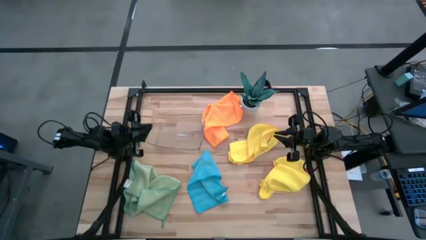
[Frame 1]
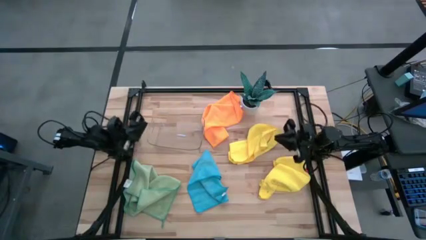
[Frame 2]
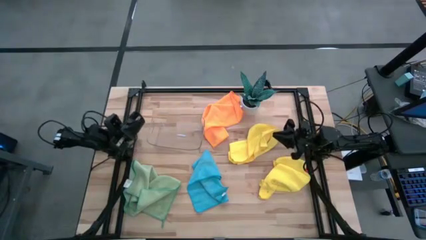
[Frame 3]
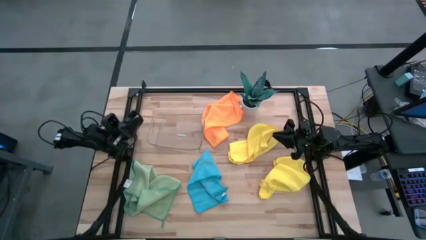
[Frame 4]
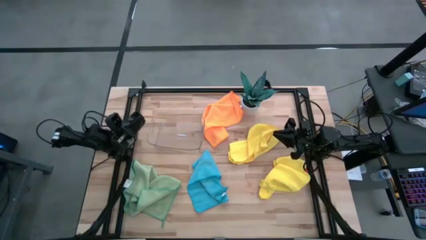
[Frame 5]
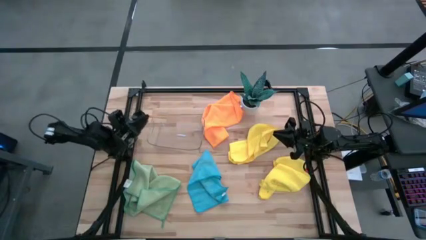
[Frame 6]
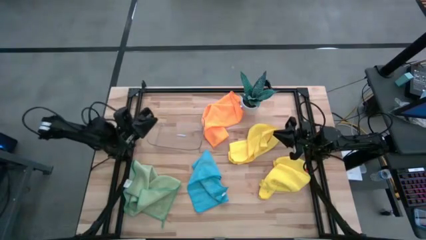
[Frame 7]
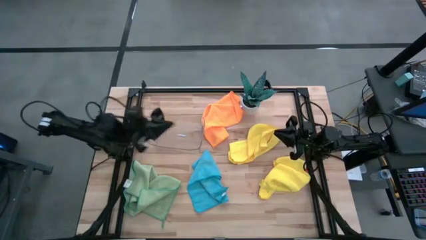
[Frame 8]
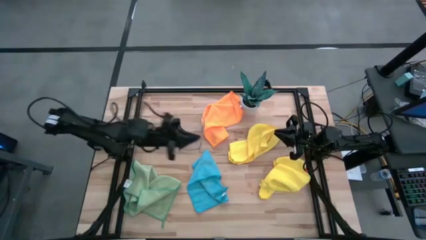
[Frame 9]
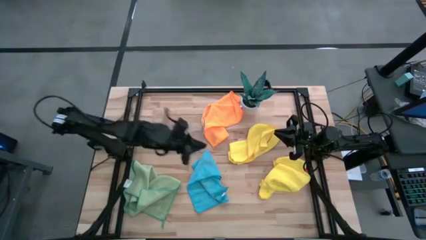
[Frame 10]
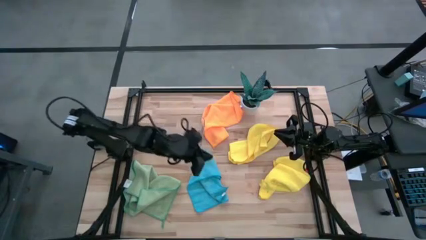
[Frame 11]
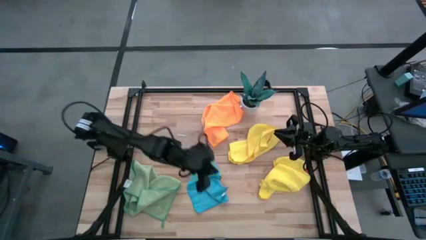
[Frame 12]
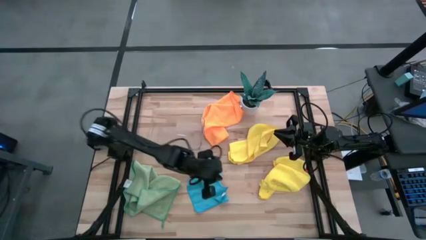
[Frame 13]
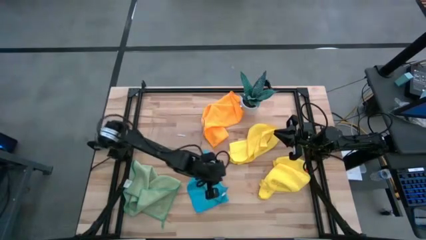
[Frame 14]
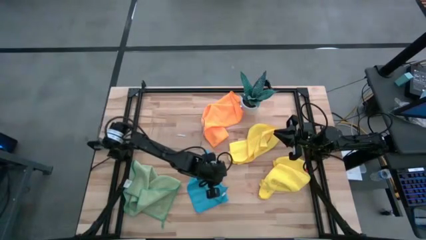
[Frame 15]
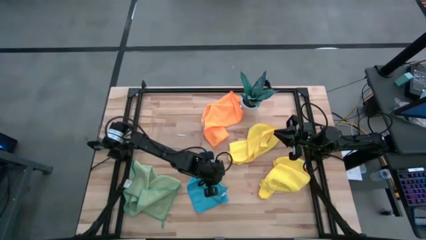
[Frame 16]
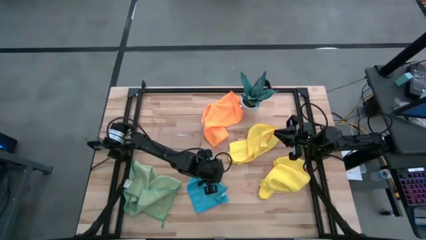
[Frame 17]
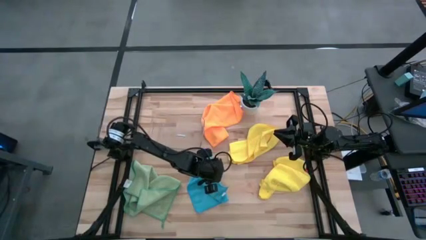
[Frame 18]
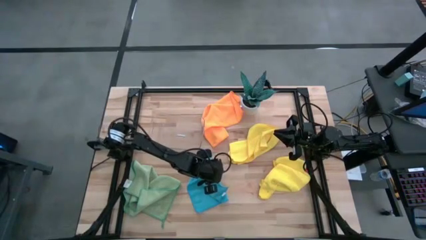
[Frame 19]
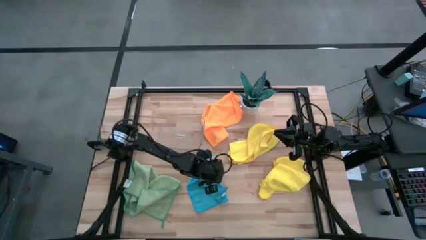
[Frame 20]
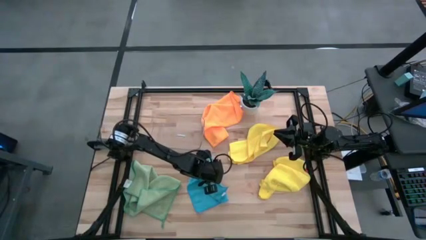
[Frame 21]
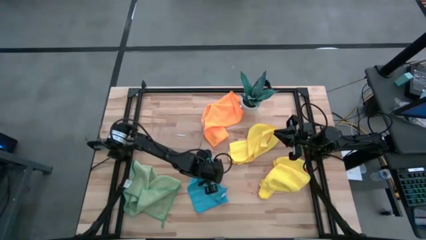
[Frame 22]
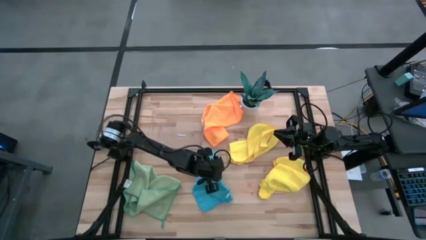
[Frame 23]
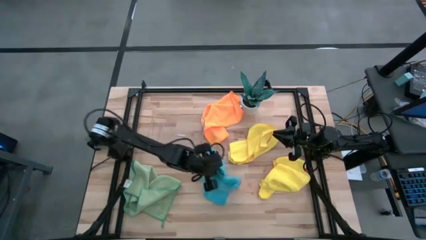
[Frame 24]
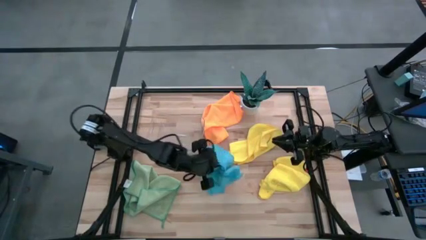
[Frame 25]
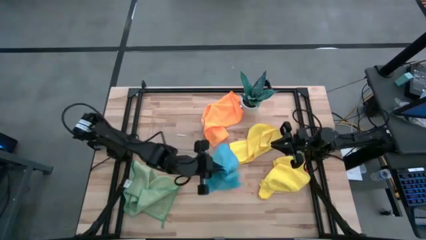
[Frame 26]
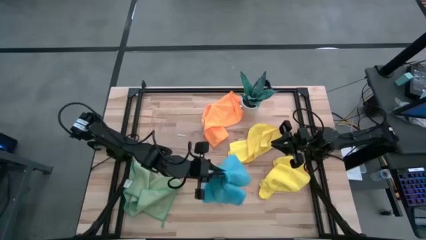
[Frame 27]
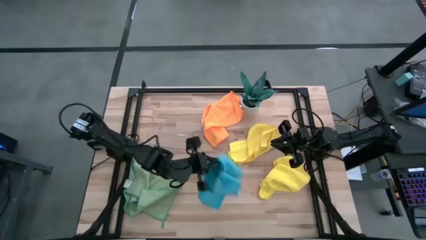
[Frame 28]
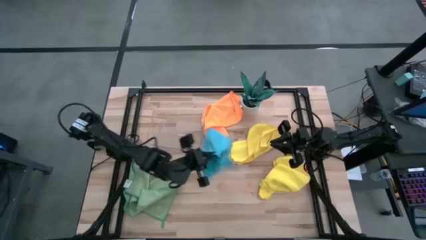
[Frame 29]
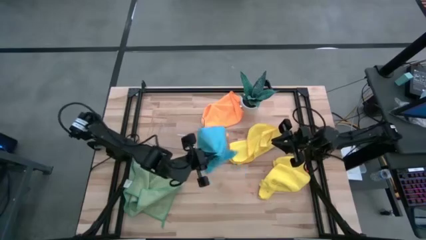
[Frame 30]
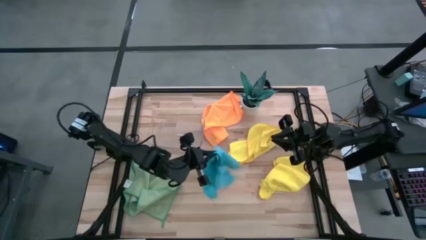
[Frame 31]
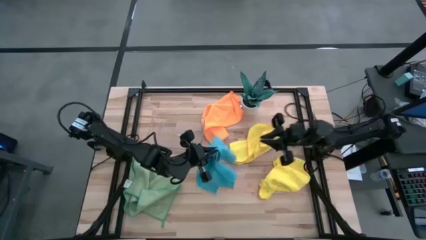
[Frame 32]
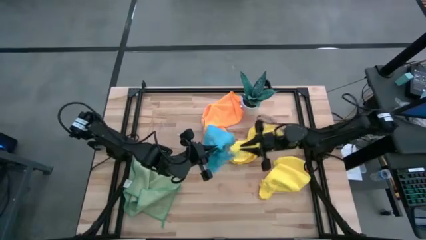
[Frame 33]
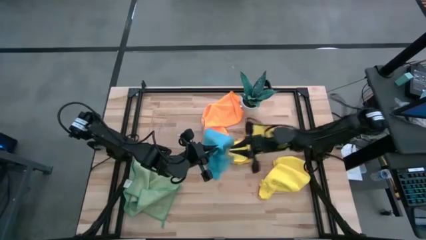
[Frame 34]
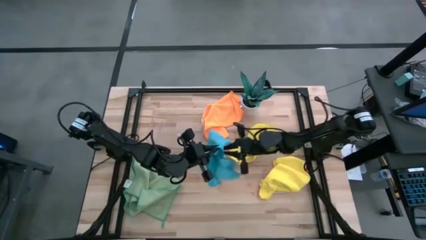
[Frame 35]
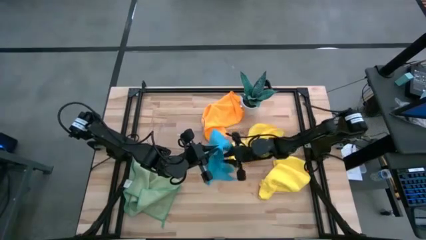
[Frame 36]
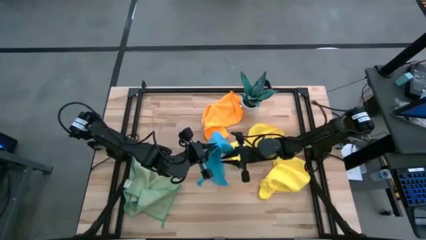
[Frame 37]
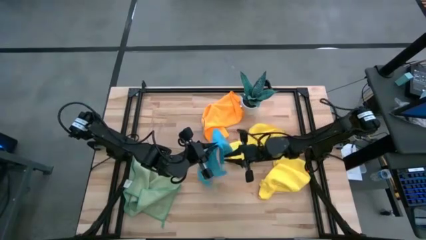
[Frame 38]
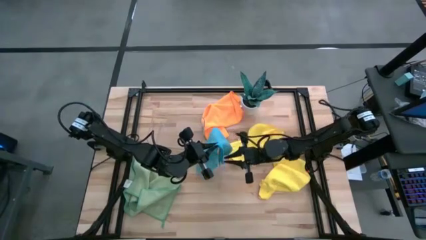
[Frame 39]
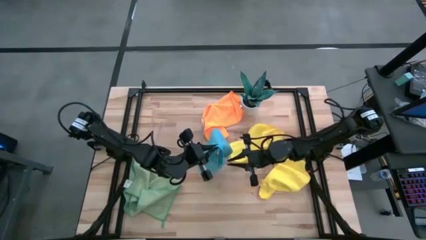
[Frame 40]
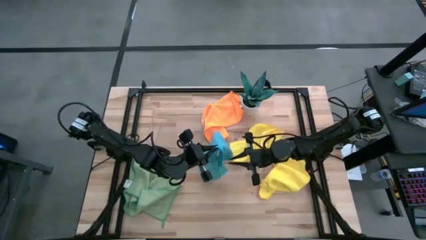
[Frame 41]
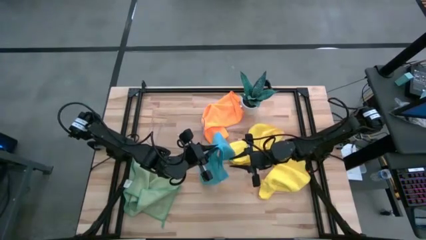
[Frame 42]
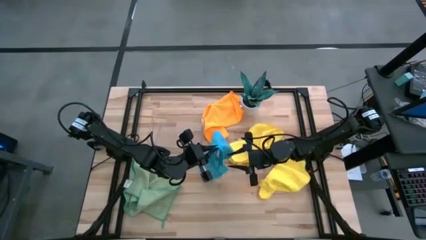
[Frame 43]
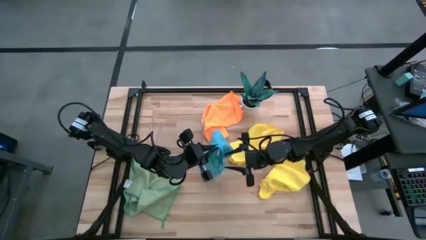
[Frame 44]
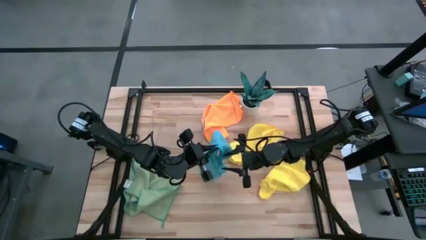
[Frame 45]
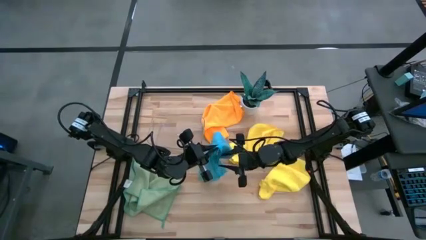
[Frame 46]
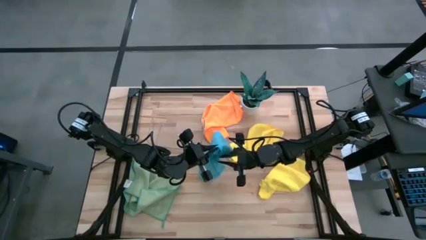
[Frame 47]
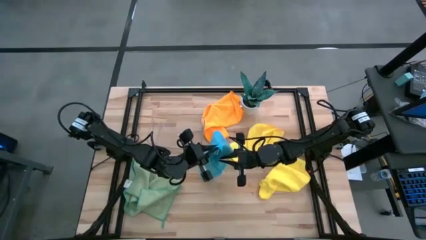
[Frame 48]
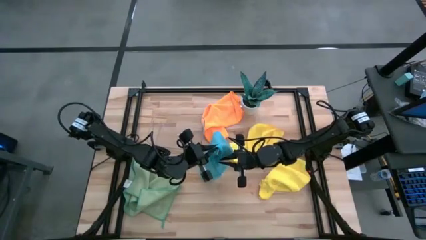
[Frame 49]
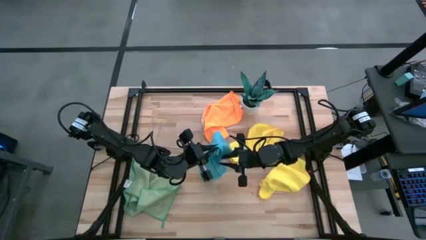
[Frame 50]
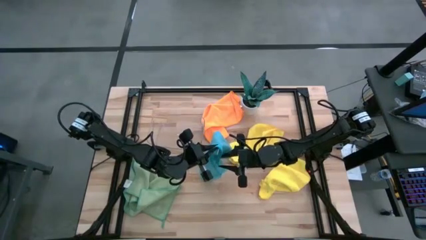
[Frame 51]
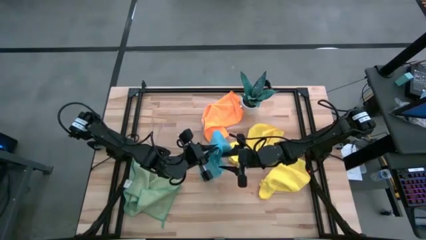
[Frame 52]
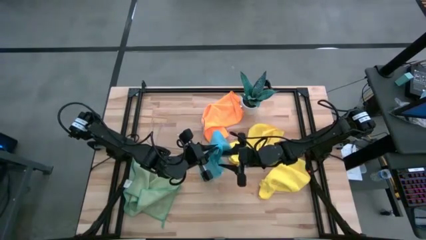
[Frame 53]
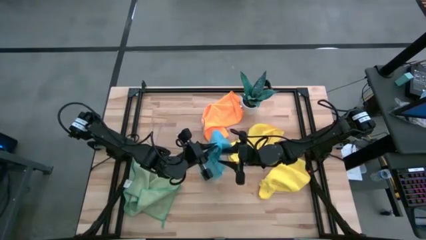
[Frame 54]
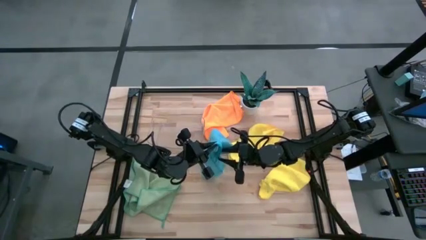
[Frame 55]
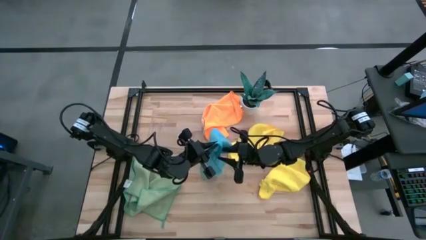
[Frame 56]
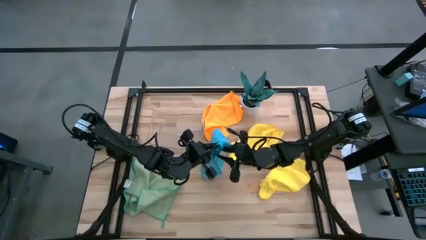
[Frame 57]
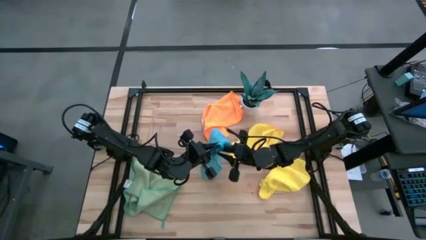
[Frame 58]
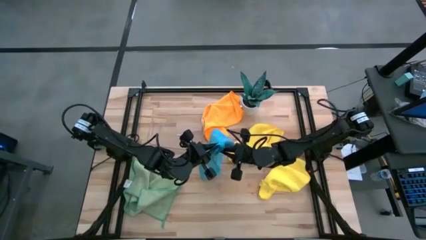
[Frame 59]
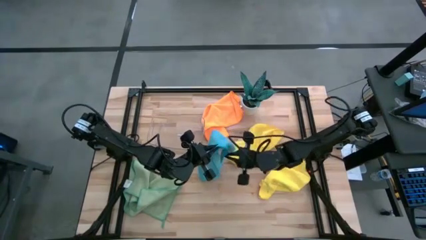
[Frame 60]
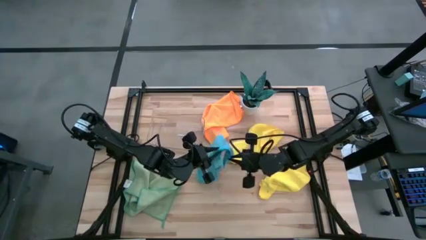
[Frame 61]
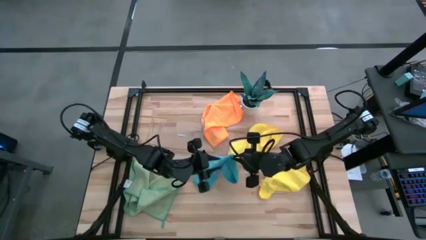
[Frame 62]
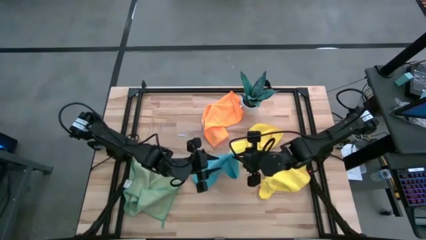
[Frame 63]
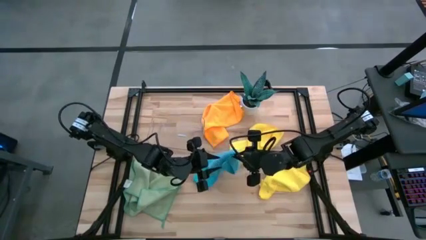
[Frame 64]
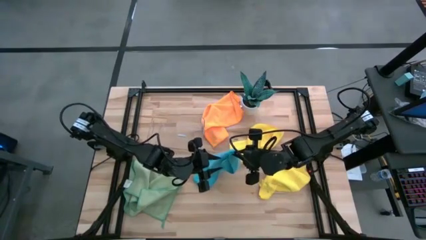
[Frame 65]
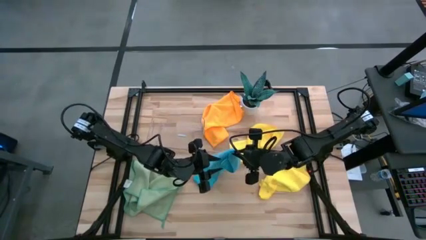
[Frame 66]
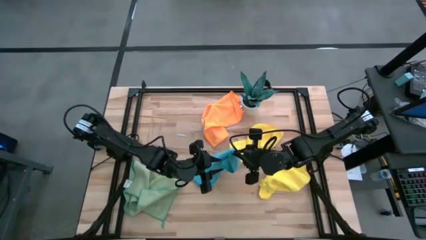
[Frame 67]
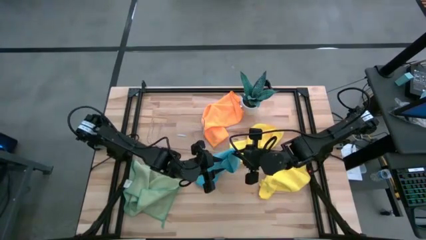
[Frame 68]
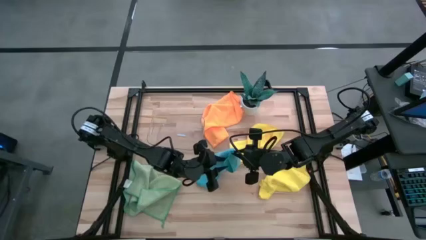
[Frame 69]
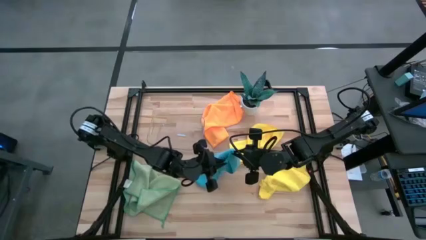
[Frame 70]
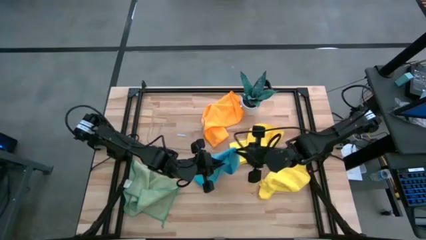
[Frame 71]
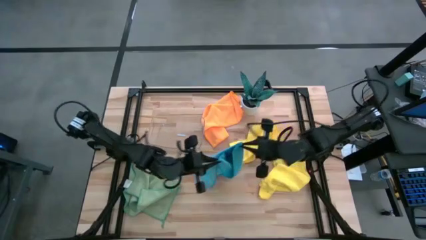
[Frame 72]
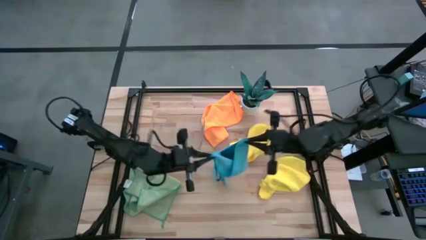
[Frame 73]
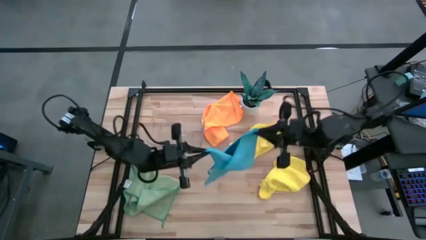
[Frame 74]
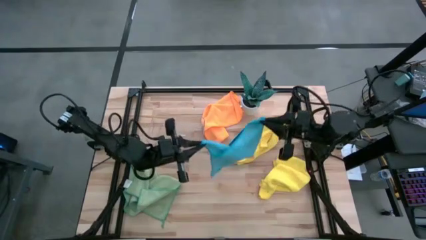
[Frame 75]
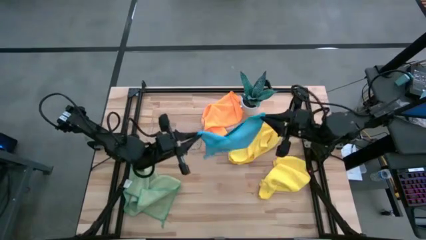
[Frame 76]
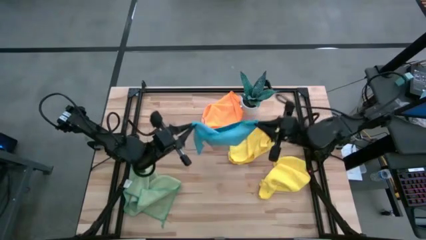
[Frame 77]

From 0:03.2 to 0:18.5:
Task: Fold microfiber towels
Fold the blue microfiber cloth
